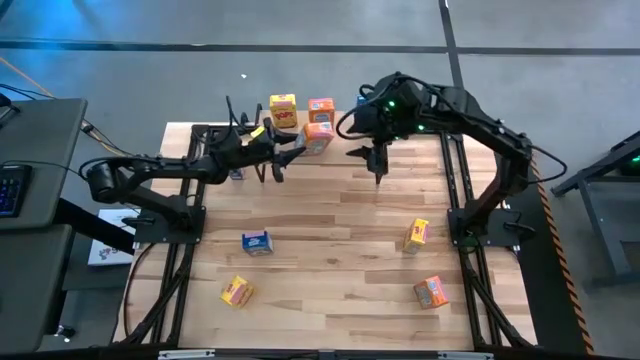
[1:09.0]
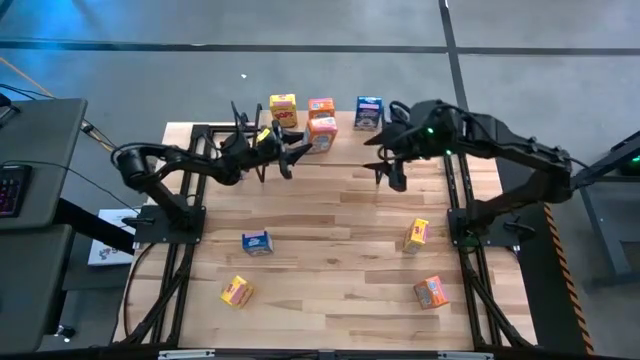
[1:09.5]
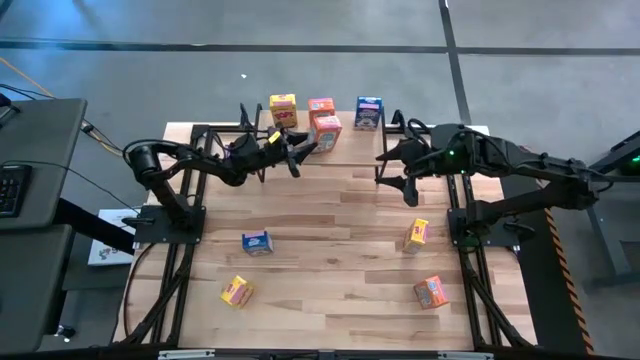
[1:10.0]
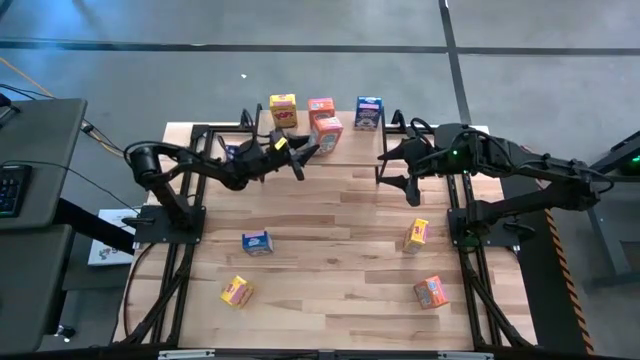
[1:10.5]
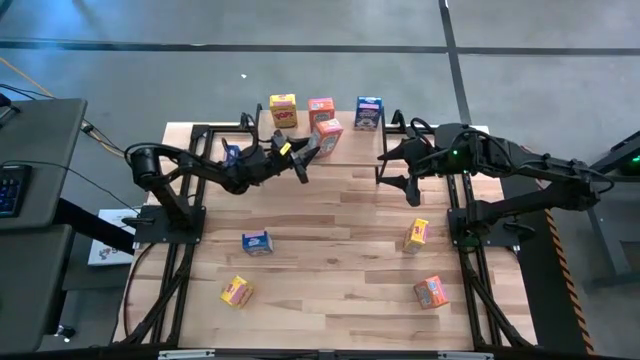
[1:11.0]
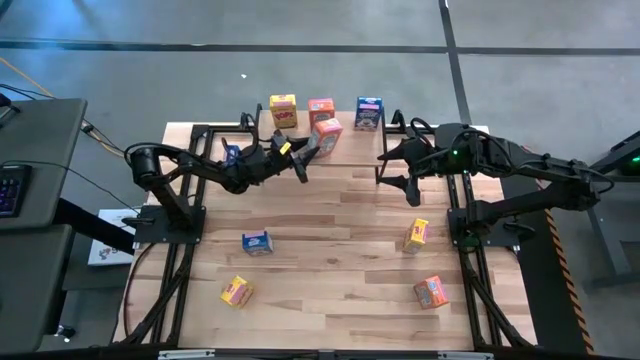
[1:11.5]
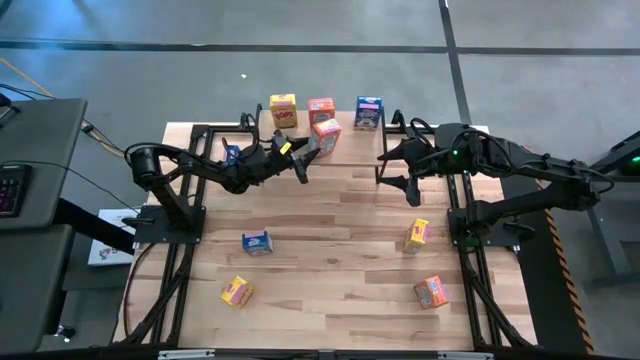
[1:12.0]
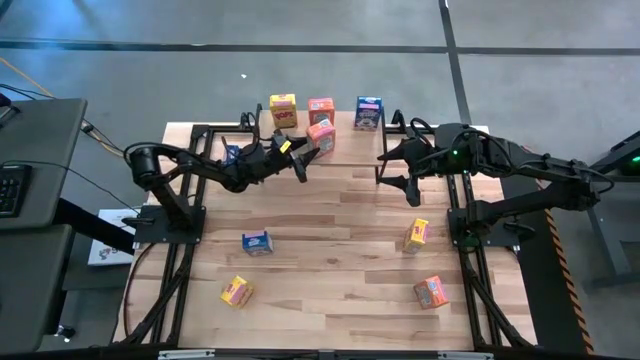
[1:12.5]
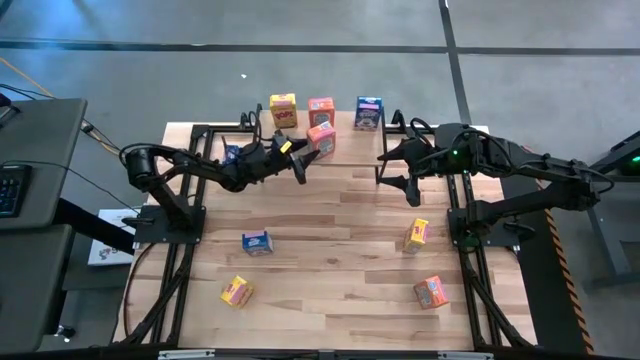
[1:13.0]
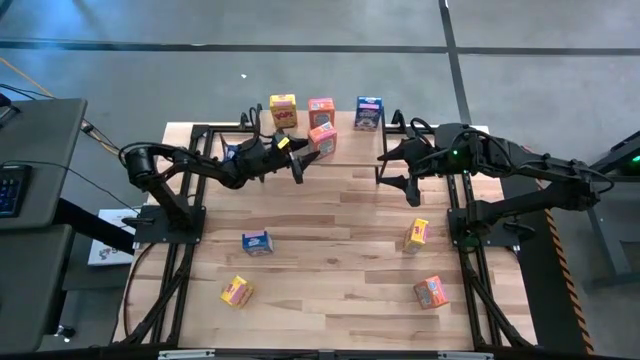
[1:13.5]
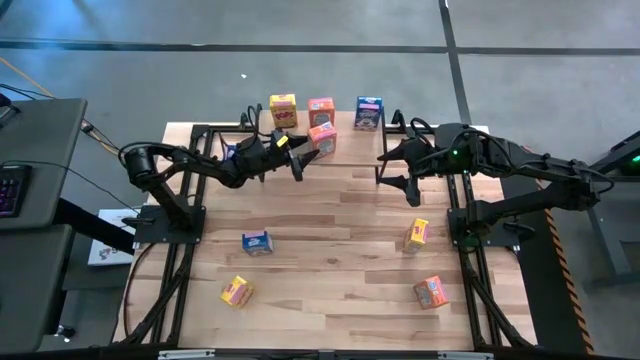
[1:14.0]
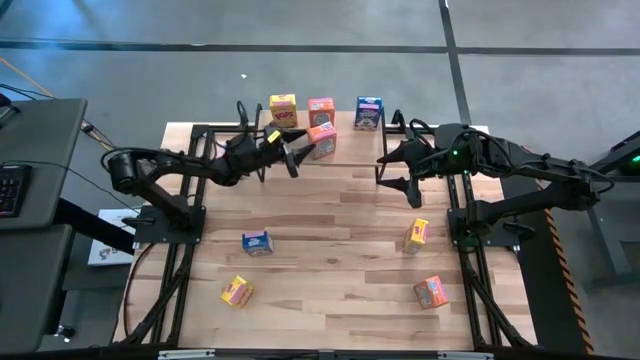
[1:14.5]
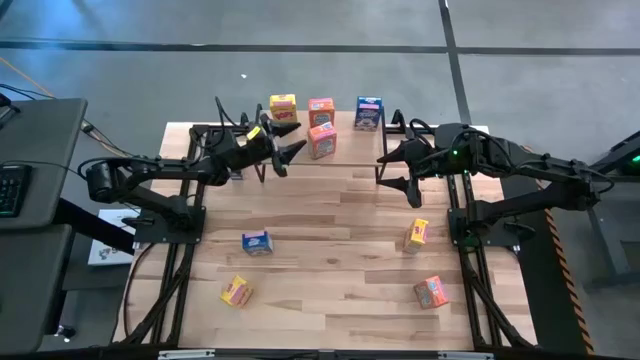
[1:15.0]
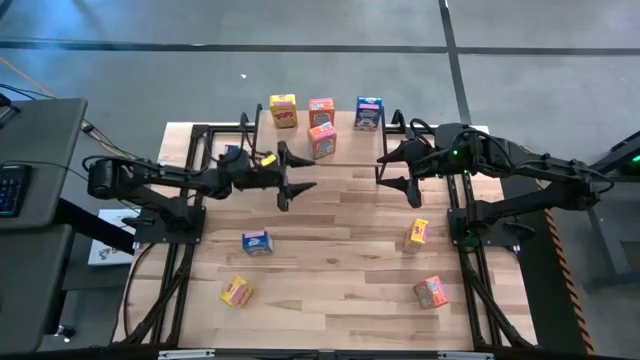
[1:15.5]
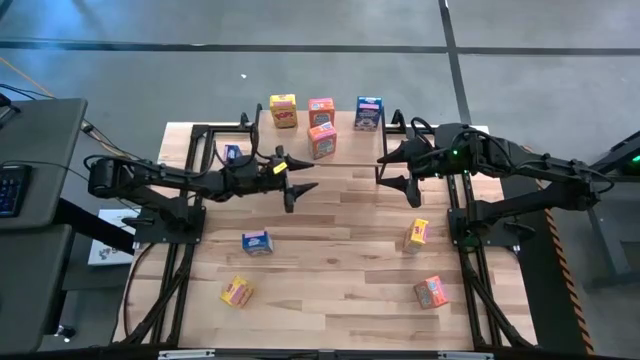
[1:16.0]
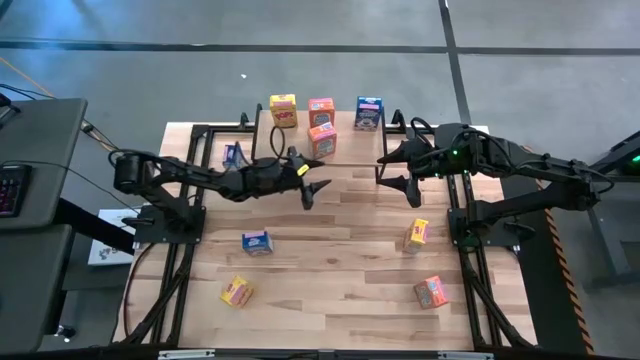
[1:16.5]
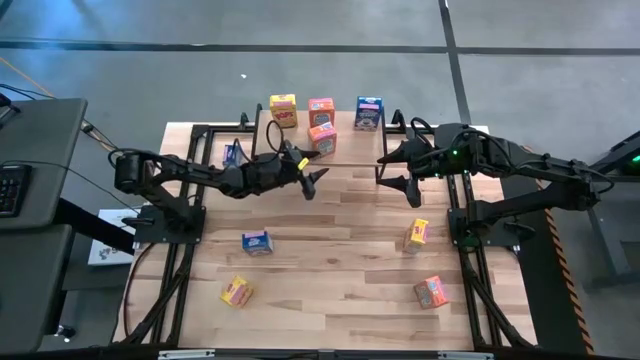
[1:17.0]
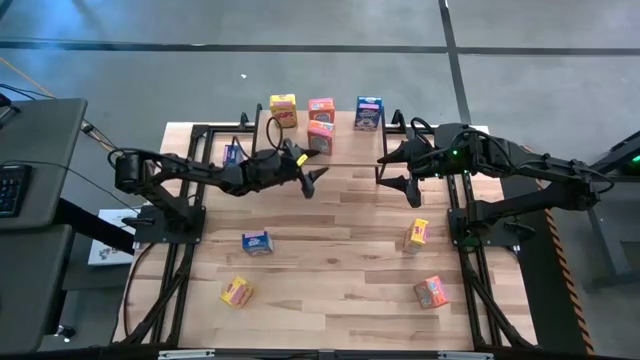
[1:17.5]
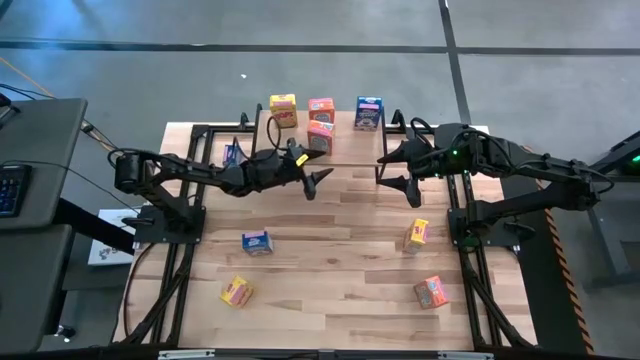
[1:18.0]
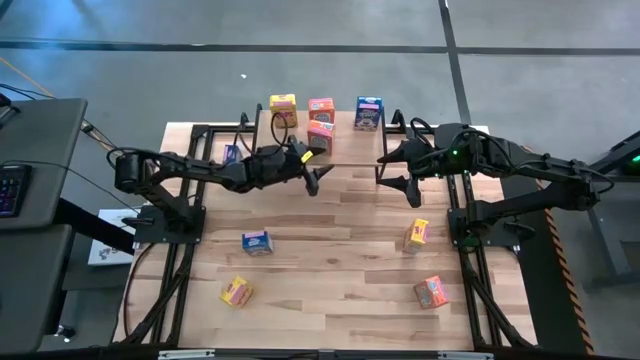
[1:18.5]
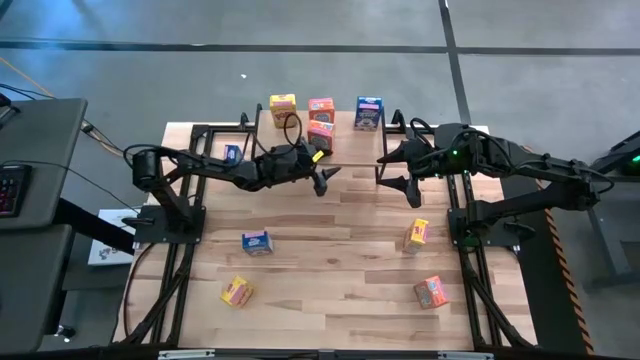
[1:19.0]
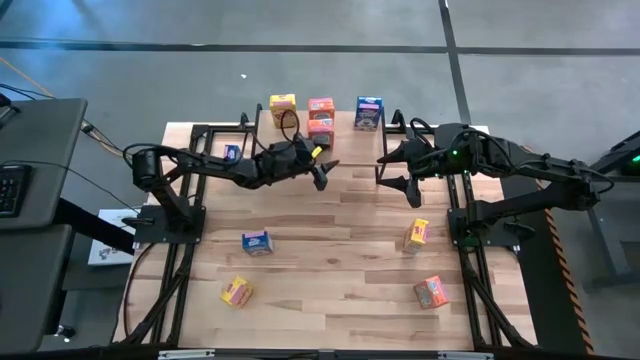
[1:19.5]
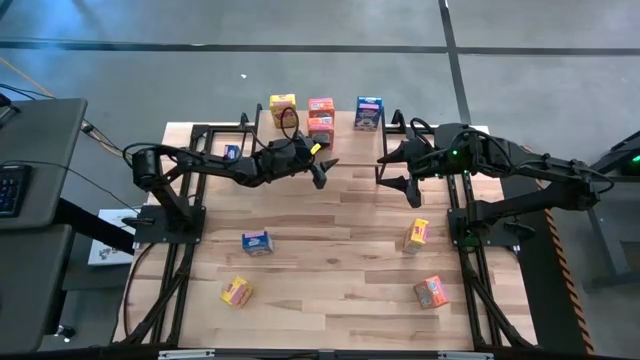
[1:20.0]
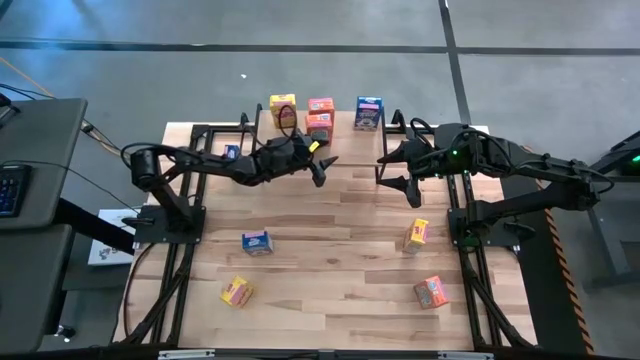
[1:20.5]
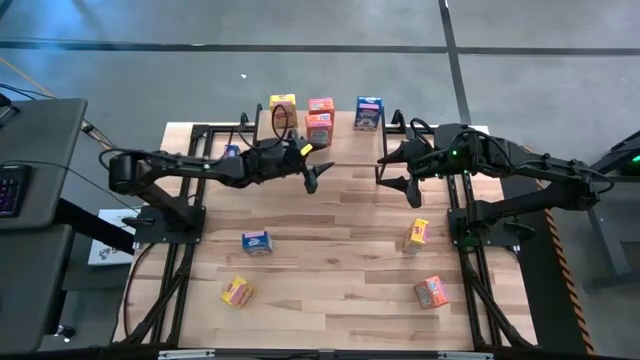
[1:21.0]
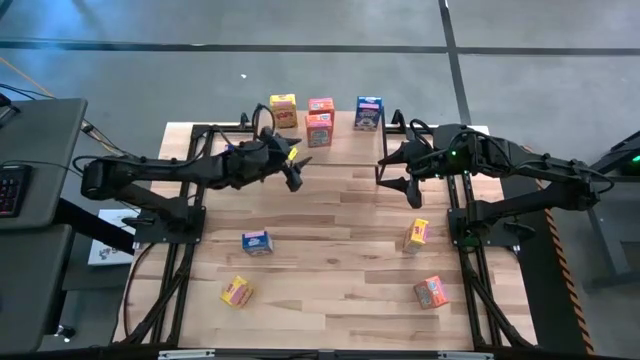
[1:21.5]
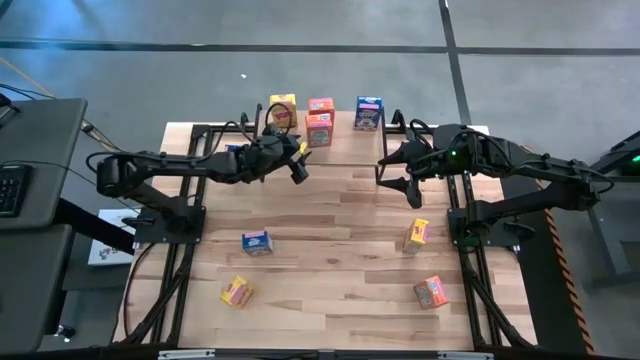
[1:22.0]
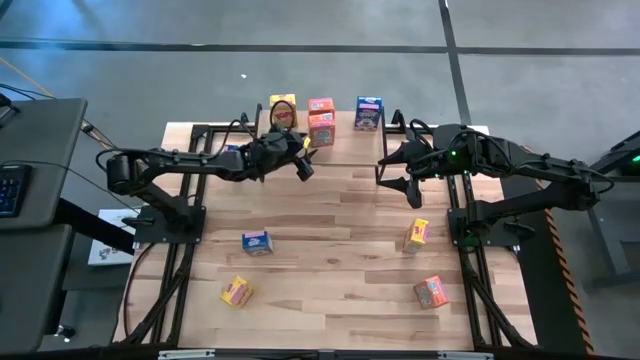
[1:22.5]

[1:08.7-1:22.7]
Task: Stack cereal on shelf
Put the top orange cereal box on the shelf aligned with the other orange cereal box
